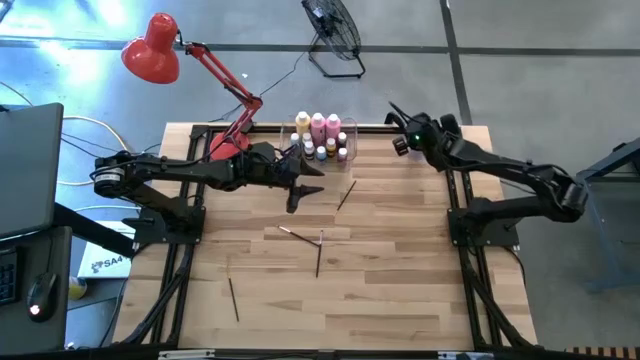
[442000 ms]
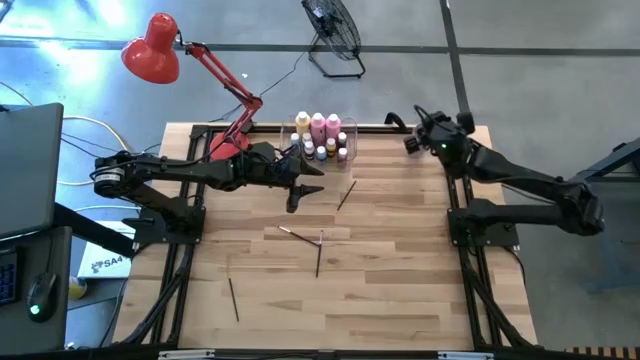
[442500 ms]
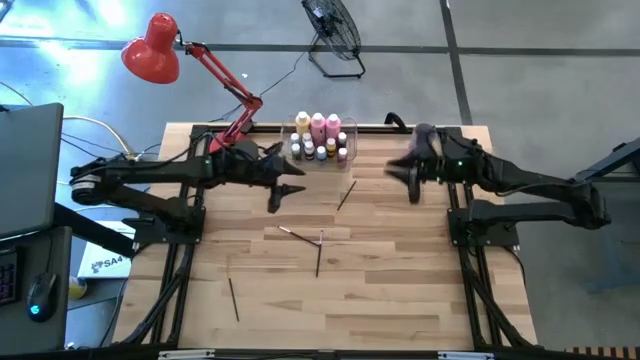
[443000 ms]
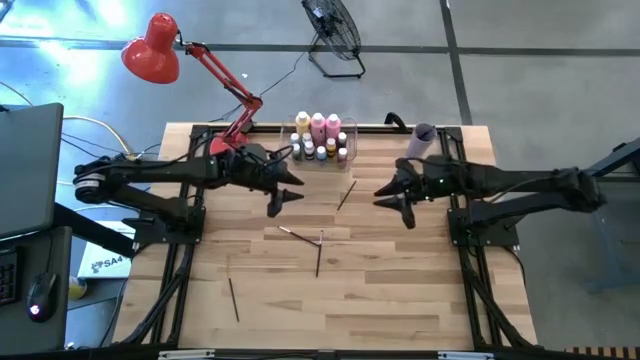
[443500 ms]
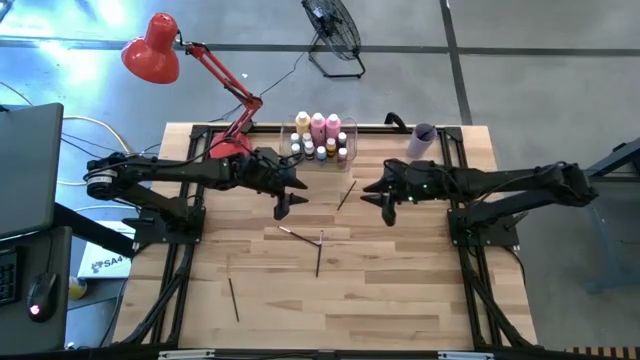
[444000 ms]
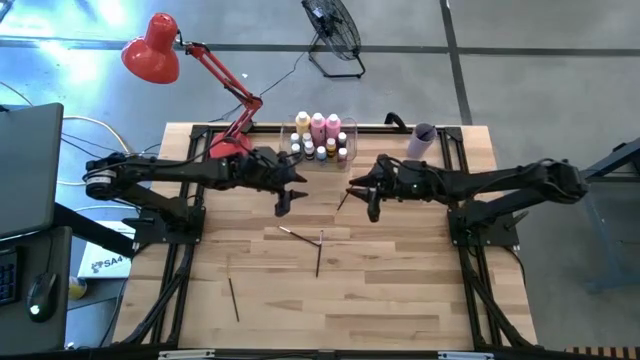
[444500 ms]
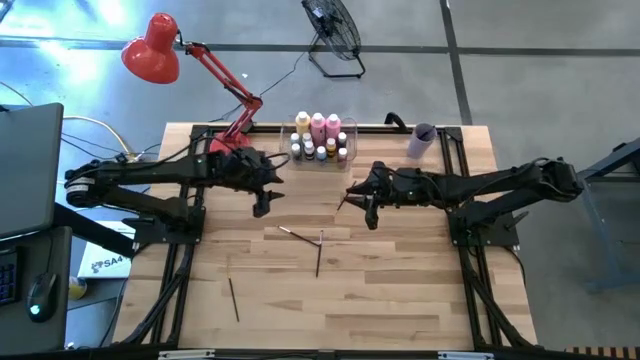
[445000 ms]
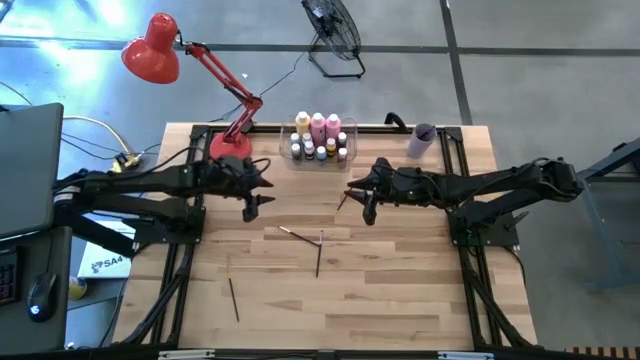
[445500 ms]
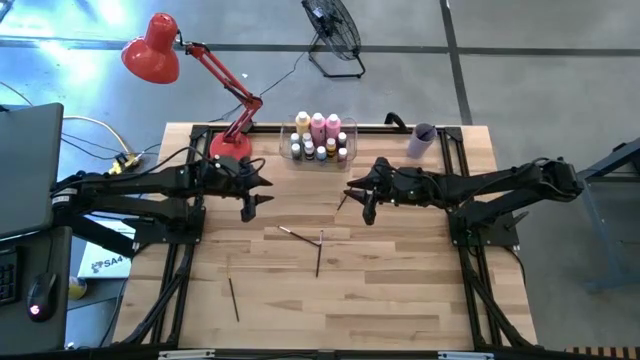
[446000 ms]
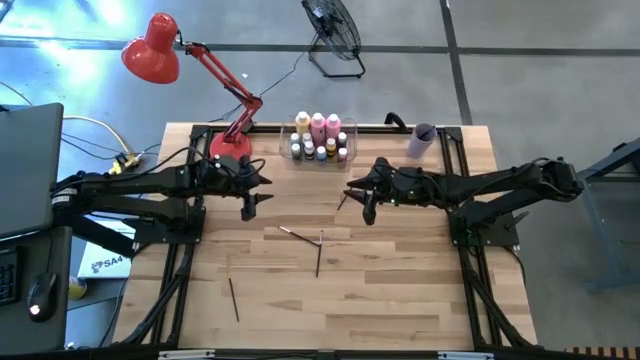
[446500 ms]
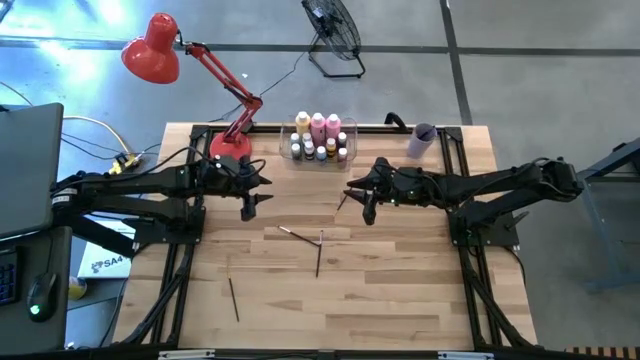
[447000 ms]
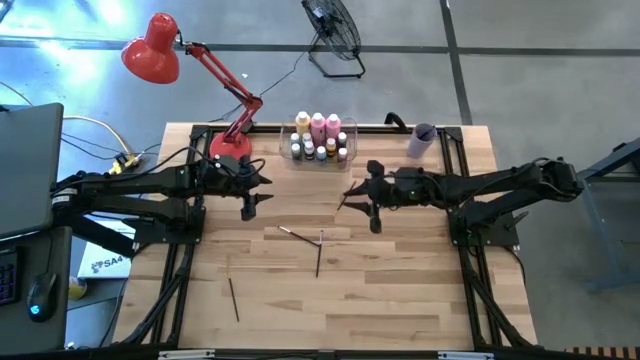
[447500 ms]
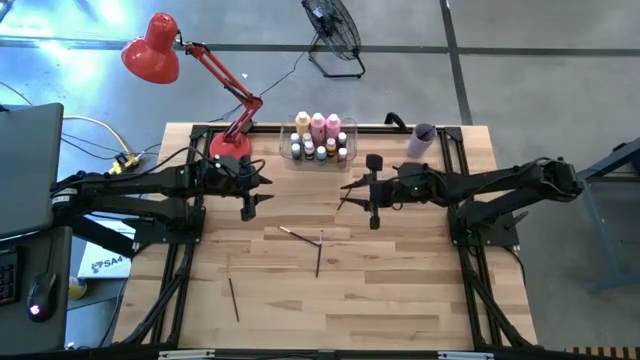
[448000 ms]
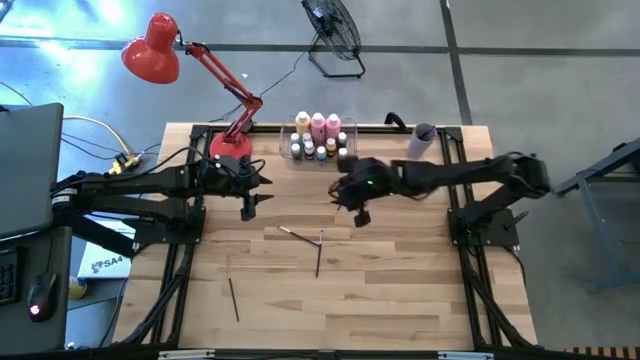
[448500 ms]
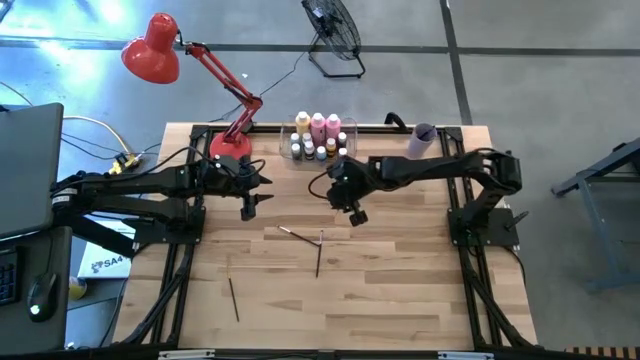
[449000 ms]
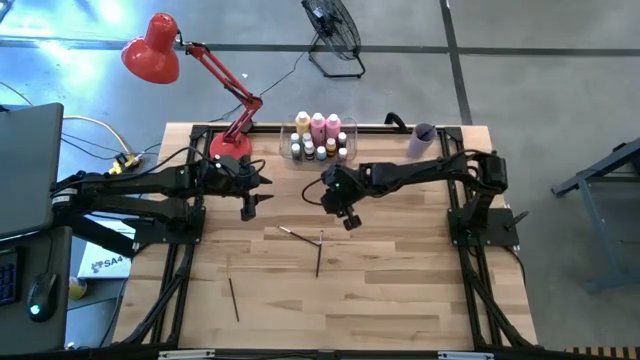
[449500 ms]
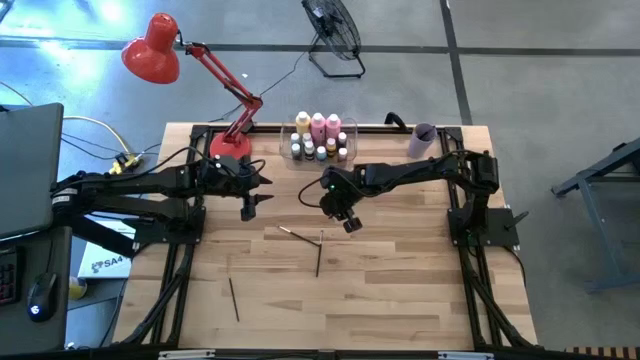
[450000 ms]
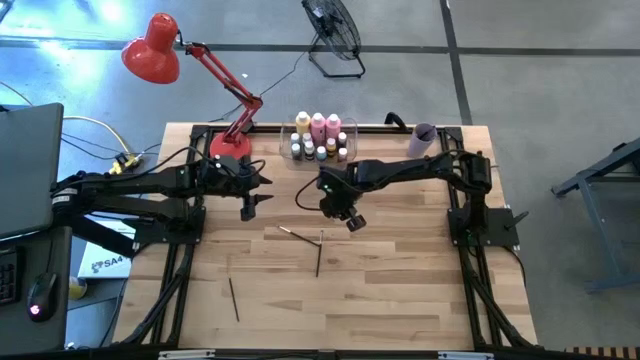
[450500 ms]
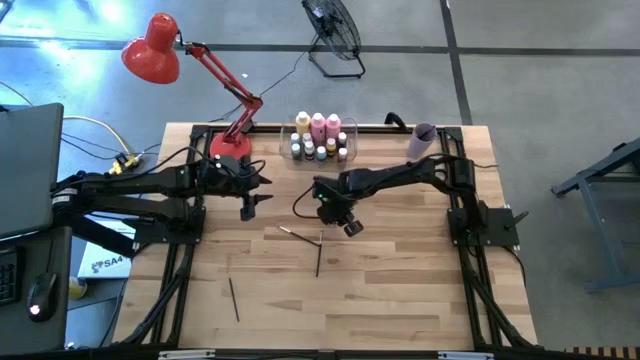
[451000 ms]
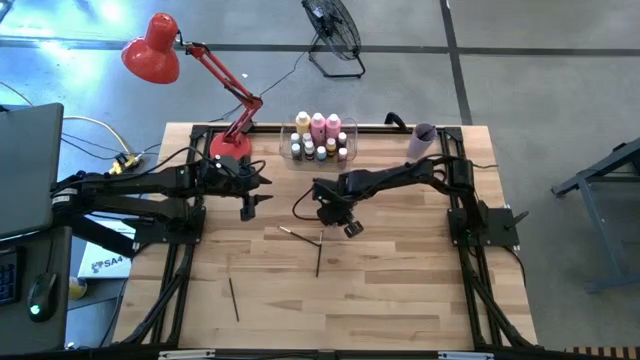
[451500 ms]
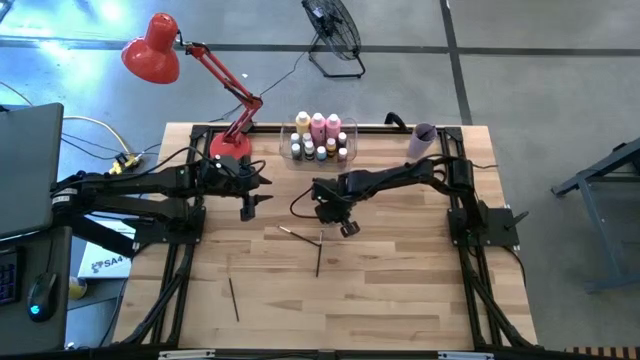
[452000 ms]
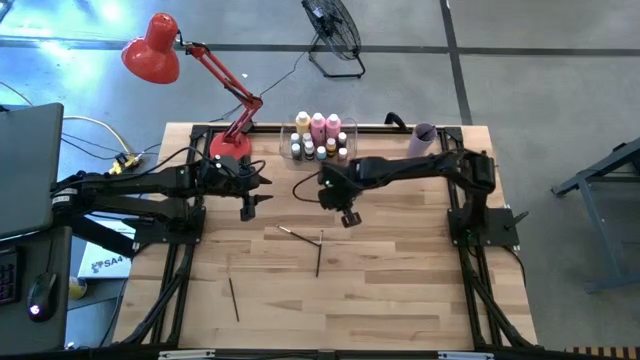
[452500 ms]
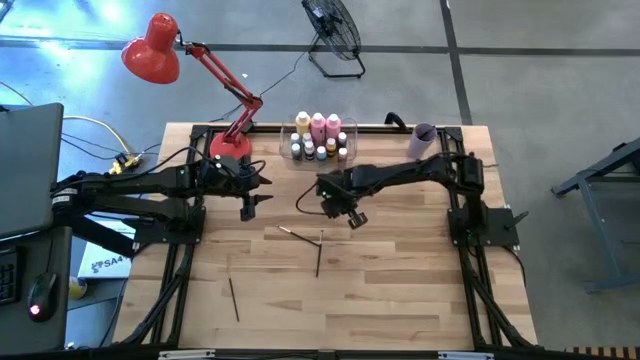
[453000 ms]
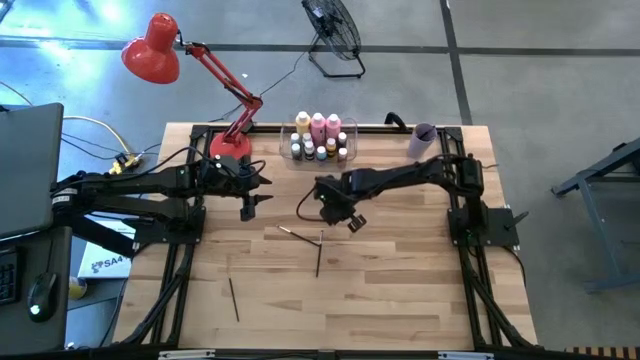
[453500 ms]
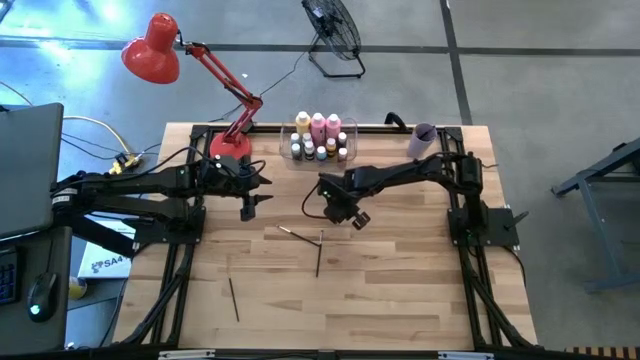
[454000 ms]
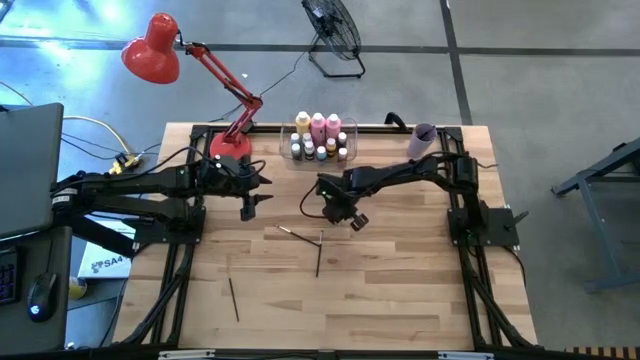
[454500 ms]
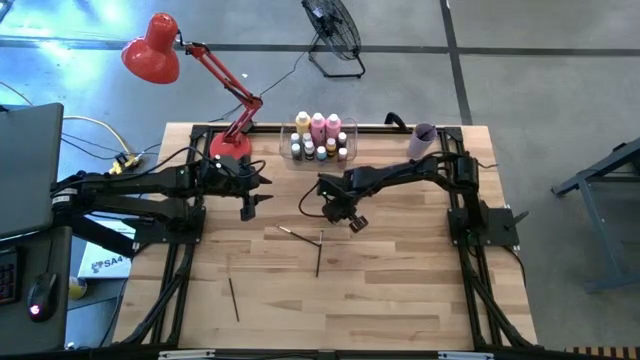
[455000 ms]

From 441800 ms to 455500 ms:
Task: Pick & Place Paint Supplies
Put the black paint brush into the violet cup

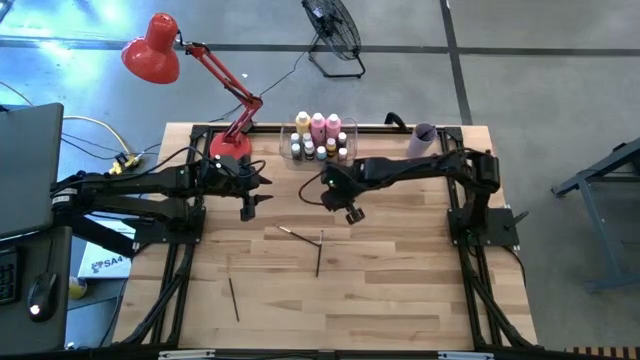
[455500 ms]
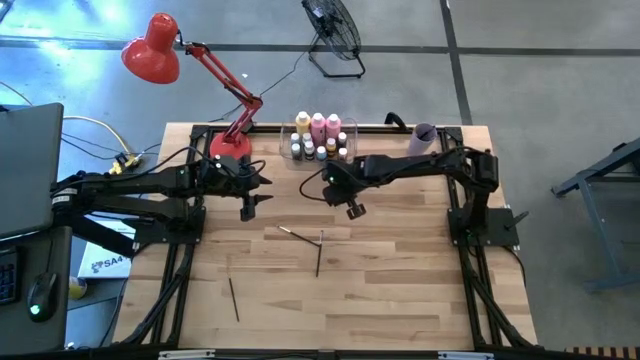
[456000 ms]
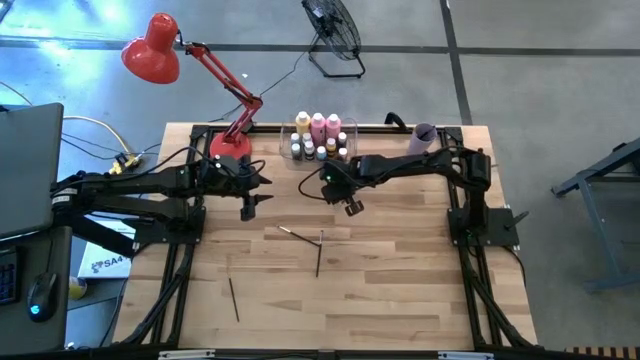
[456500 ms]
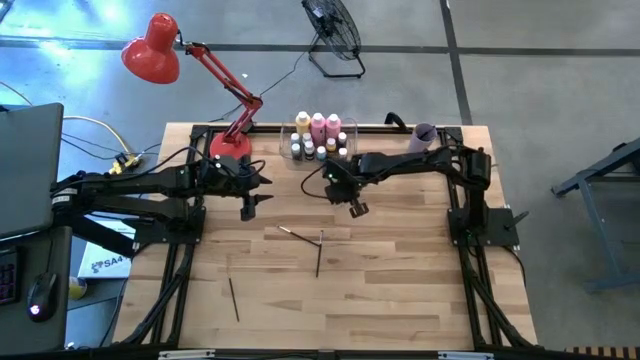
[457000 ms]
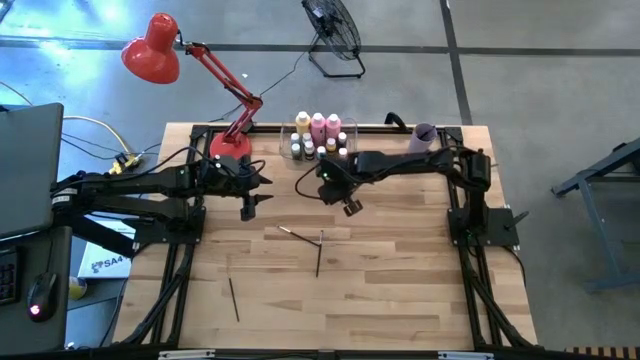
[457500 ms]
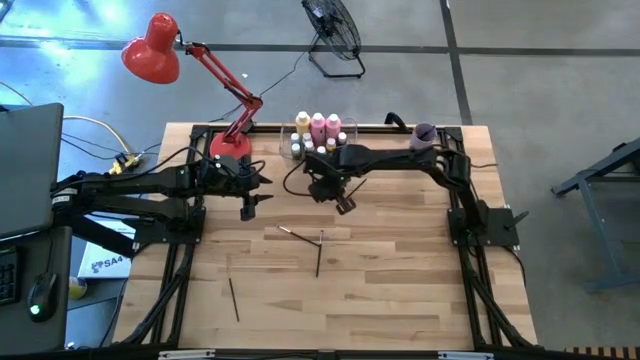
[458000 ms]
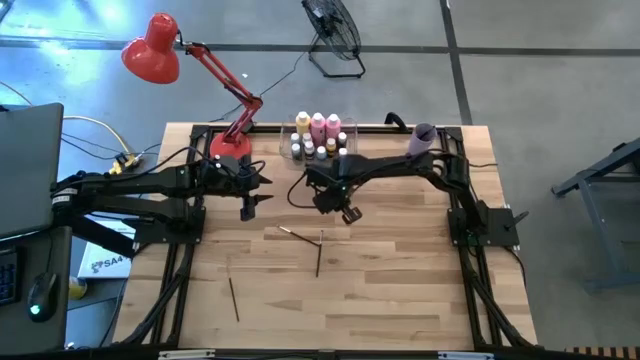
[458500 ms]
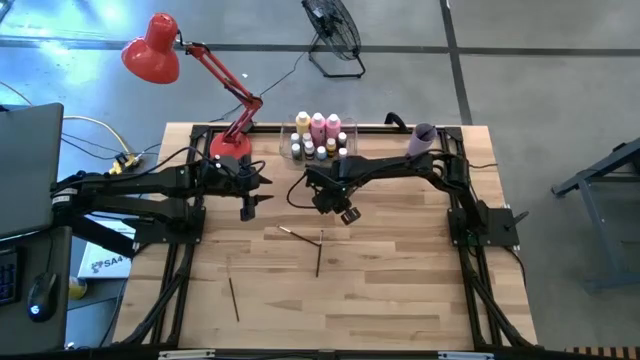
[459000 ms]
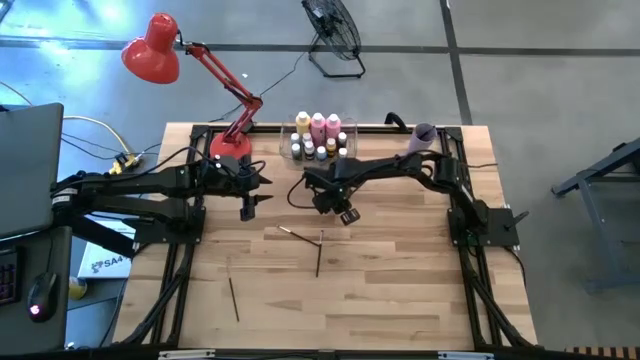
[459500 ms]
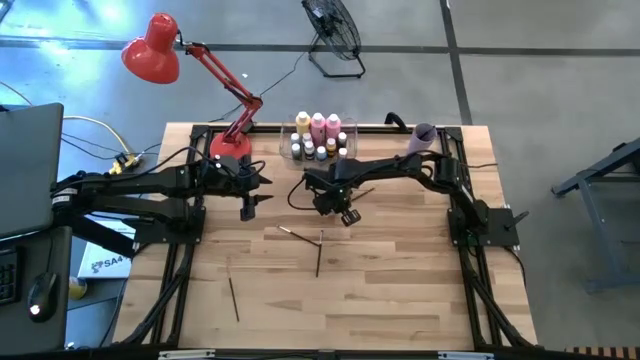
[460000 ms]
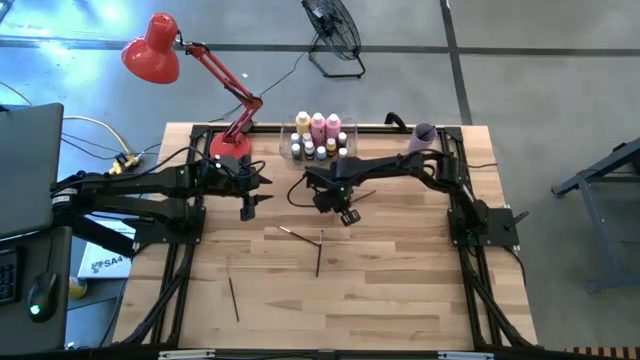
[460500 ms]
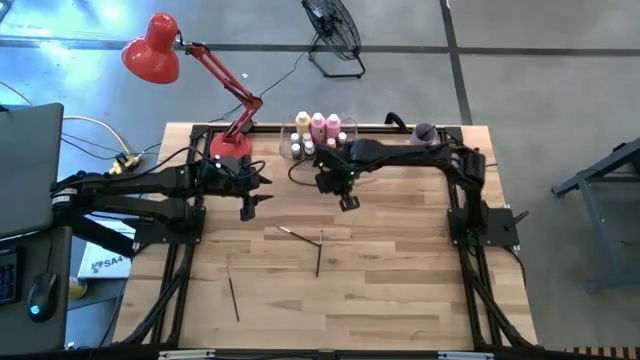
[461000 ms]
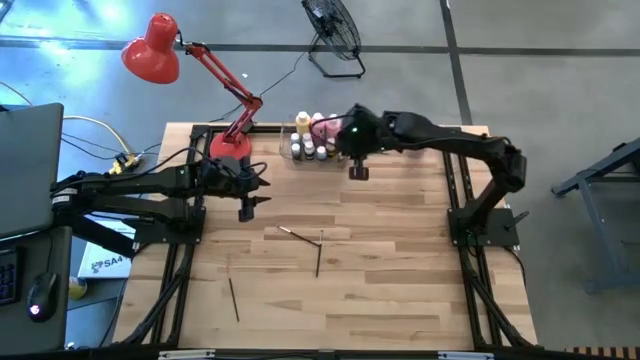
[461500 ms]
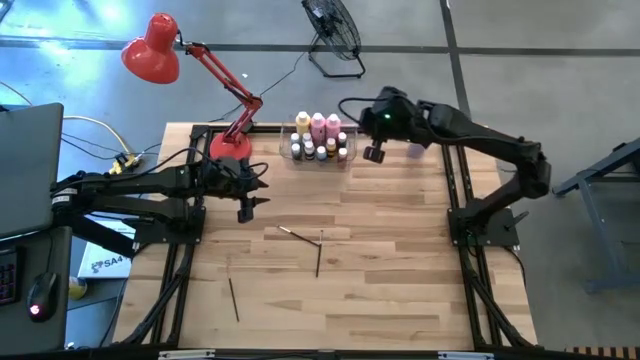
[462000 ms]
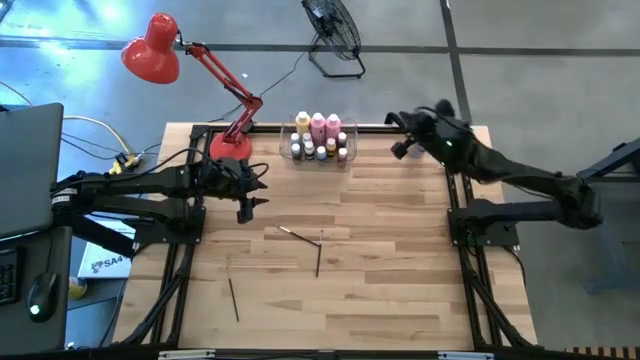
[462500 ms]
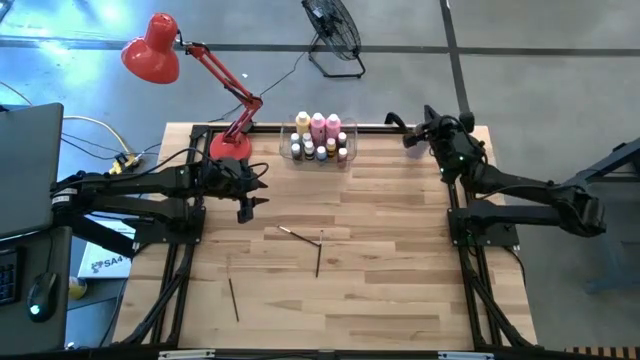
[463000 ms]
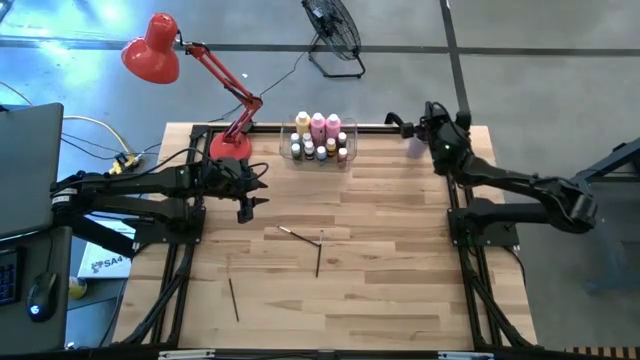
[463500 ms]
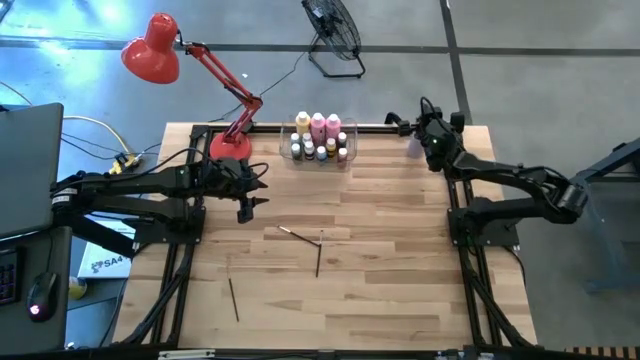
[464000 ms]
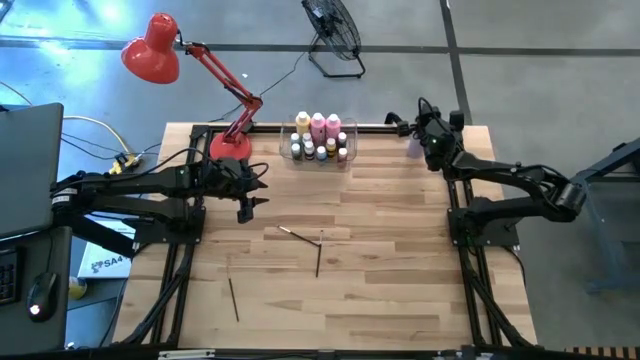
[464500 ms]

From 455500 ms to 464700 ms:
Put the black paint brush into the violet cup
